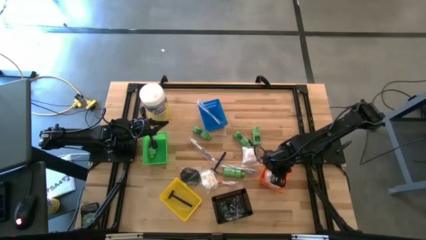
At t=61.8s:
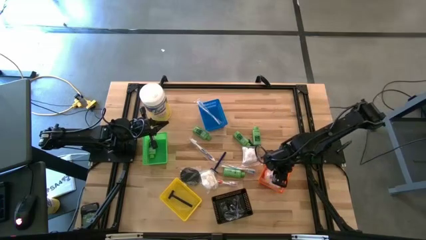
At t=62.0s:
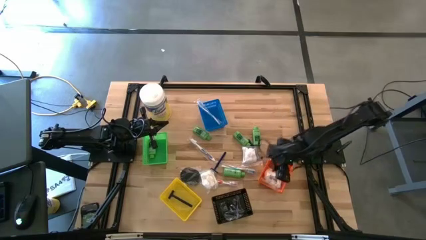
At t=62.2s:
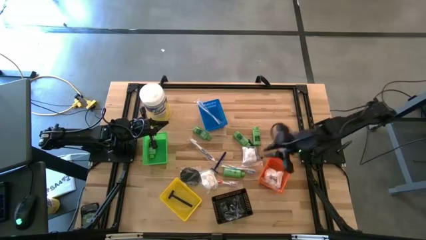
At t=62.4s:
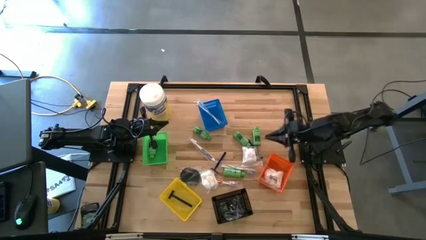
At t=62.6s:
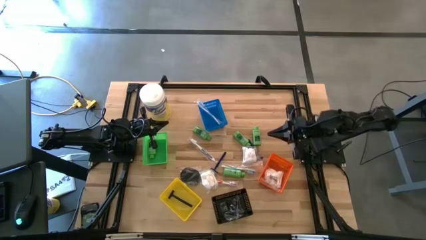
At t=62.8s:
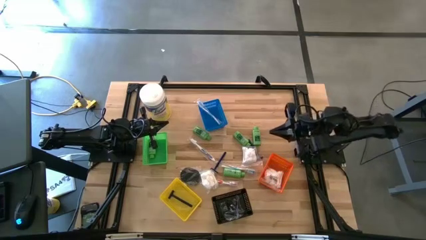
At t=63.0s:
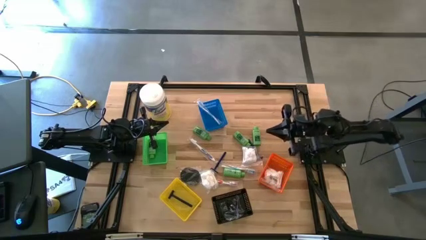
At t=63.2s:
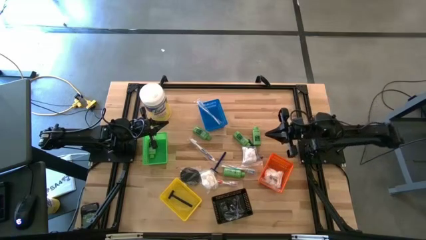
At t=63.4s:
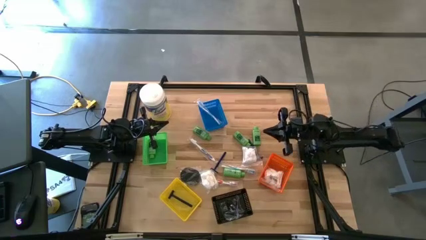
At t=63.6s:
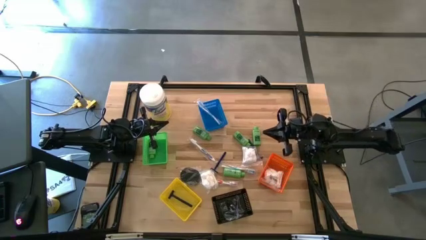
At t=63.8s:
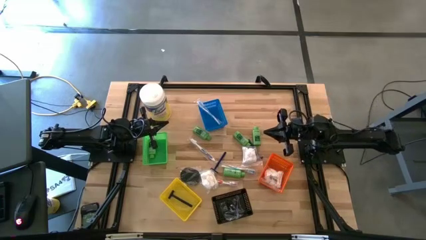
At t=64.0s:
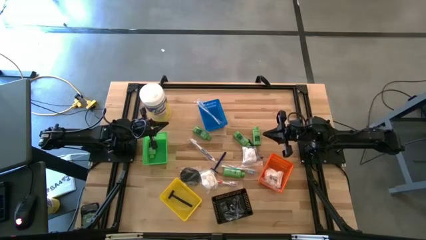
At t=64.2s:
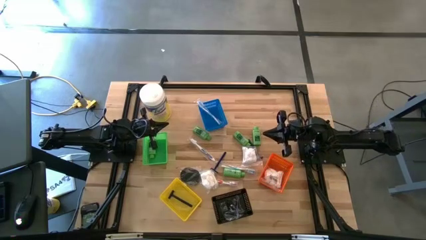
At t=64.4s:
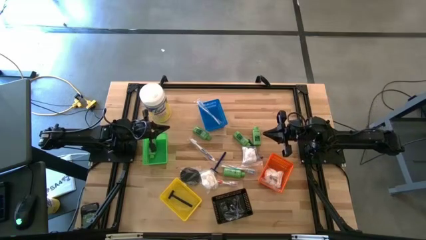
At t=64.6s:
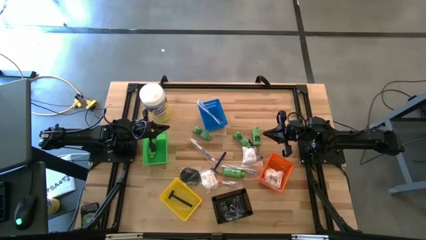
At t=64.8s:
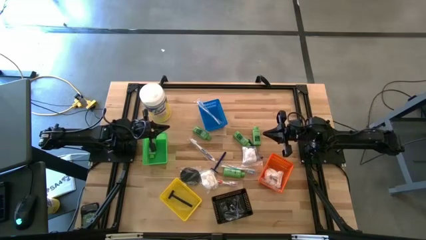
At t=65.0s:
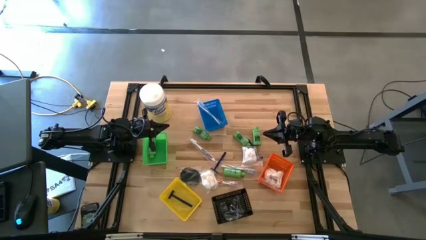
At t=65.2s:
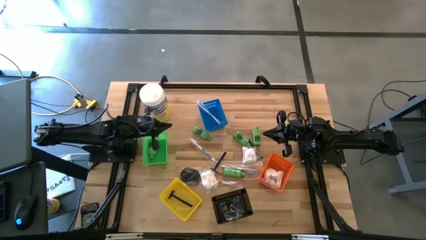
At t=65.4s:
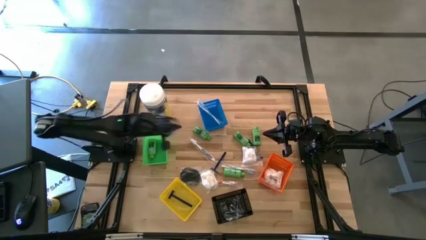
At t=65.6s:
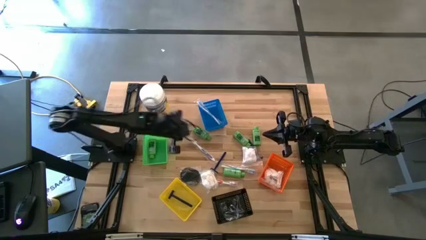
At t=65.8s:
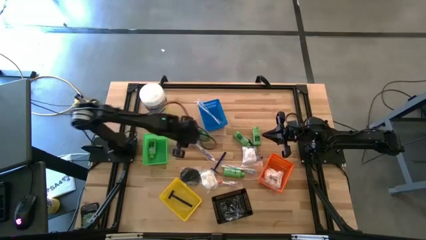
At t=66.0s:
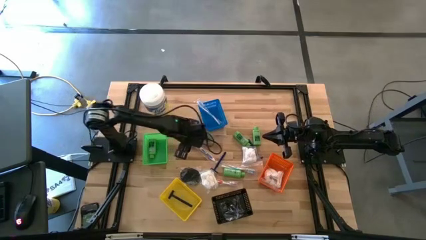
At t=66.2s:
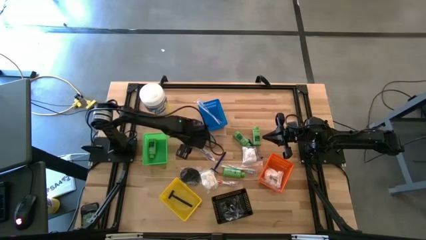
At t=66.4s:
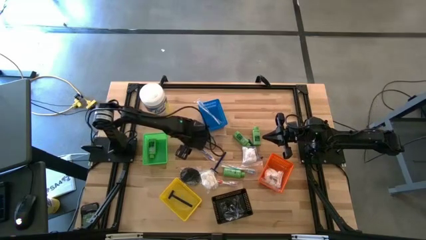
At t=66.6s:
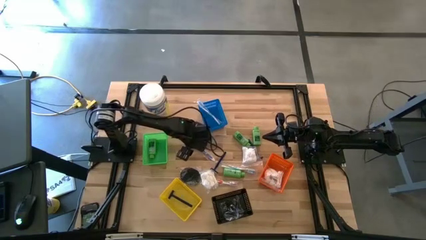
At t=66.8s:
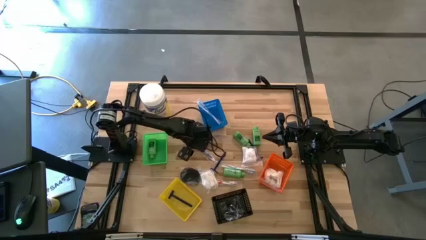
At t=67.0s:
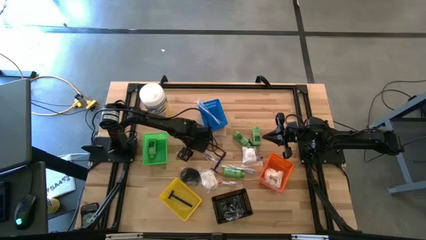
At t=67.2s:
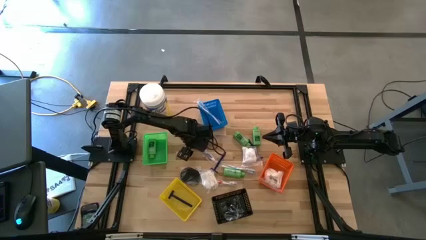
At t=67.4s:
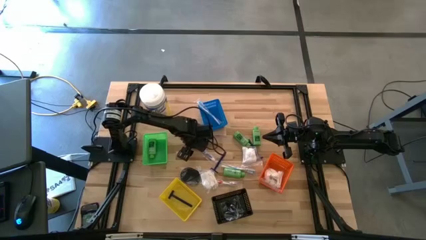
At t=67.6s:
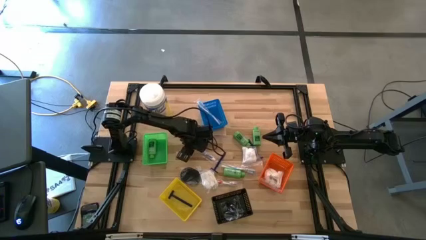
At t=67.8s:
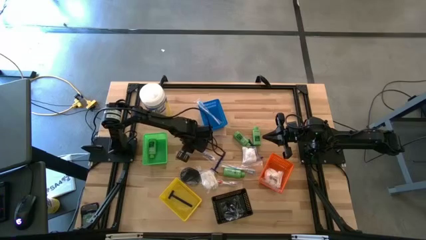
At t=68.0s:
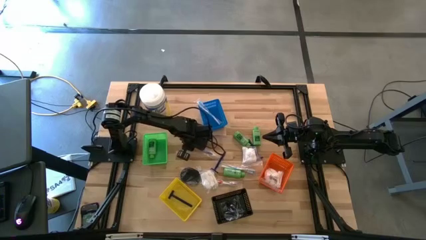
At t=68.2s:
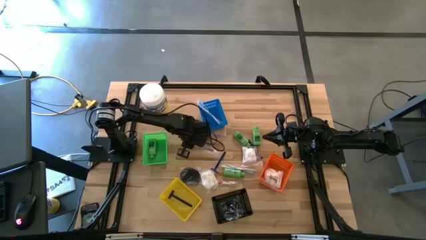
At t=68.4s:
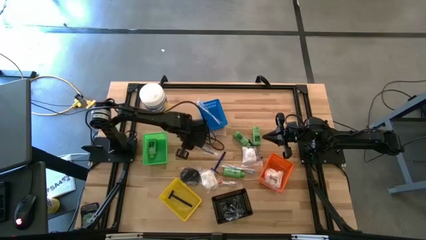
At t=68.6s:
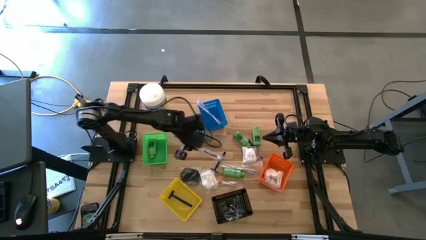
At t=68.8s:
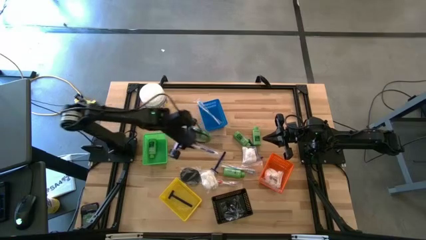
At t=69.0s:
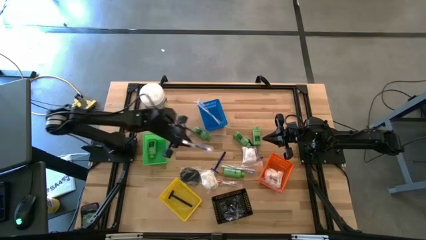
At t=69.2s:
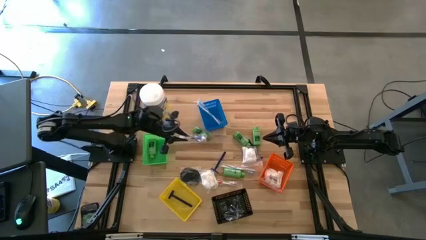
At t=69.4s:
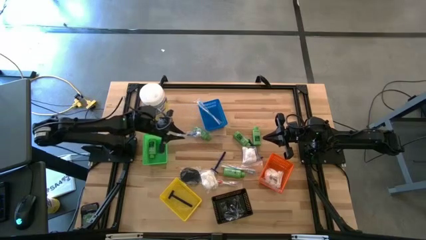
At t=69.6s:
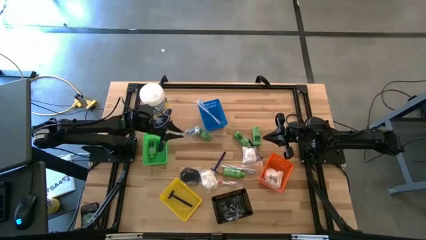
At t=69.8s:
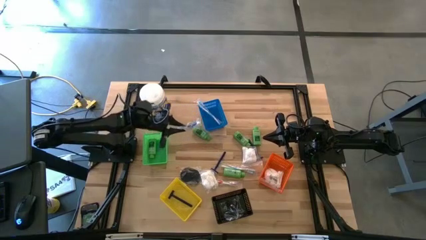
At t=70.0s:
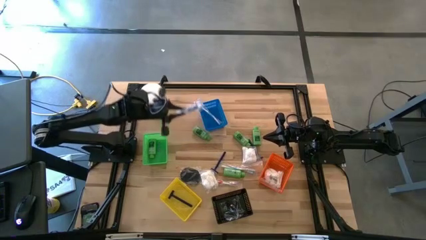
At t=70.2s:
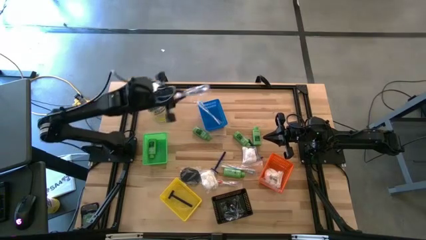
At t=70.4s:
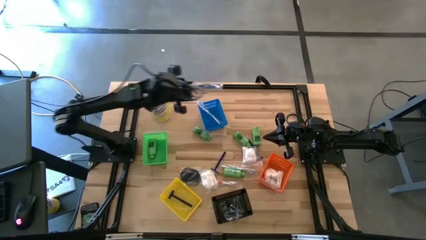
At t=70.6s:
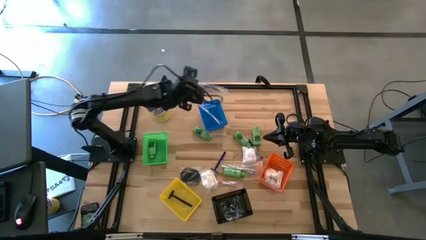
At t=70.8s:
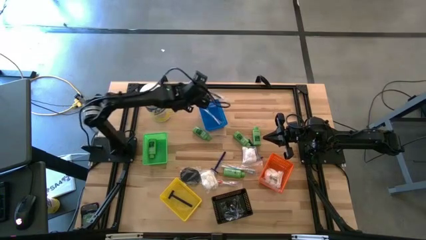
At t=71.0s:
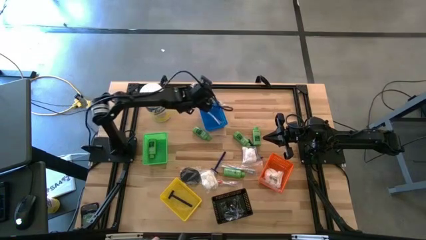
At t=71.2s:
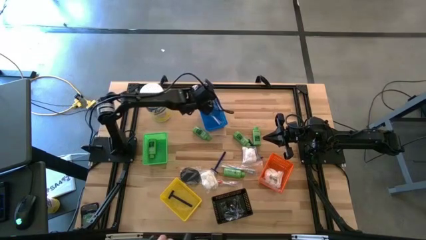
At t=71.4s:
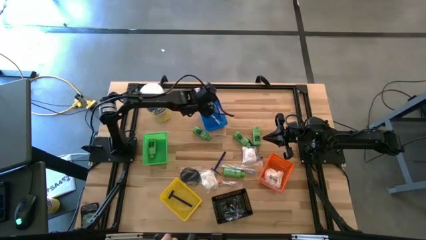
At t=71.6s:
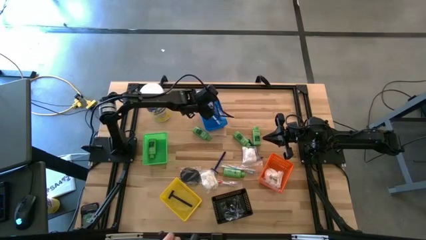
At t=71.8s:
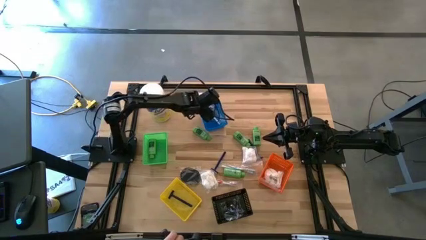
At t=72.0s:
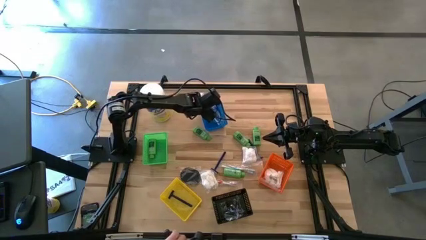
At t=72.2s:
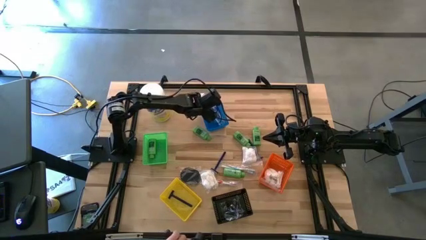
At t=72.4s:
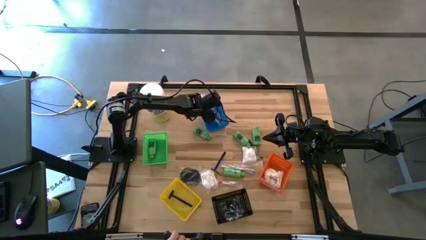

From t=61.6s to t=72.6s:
Task: Pick & Place Travel size toiletries
Put the dark blue toothbrush into the blue bin

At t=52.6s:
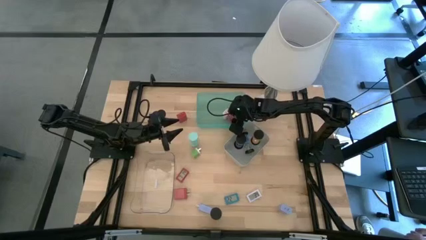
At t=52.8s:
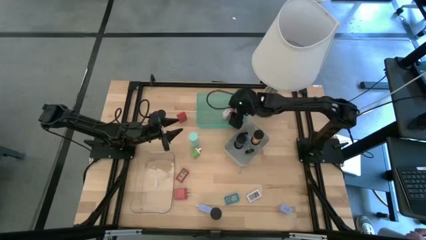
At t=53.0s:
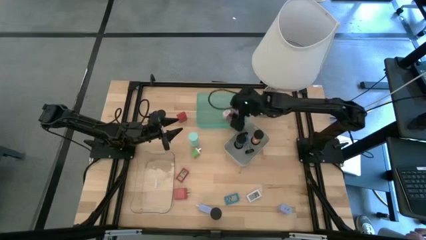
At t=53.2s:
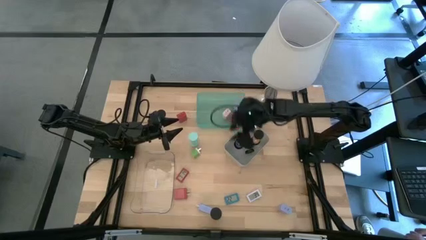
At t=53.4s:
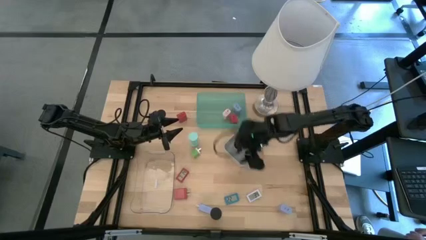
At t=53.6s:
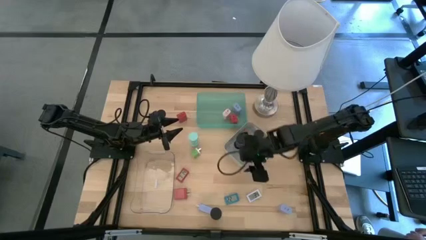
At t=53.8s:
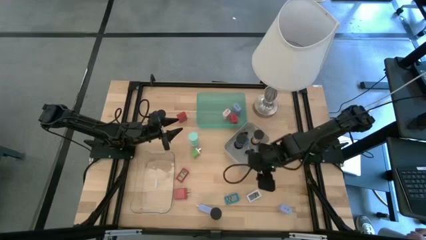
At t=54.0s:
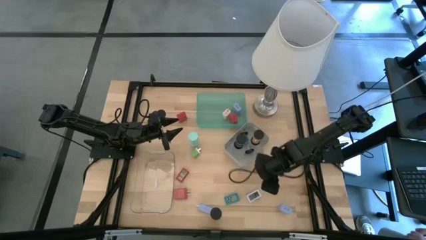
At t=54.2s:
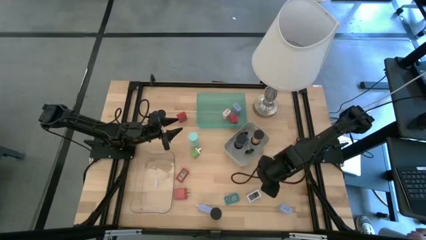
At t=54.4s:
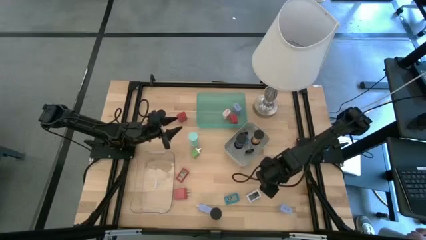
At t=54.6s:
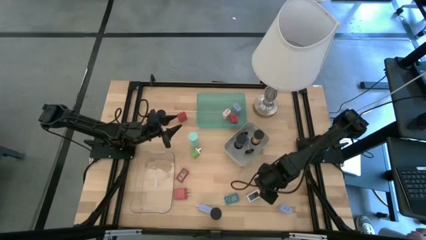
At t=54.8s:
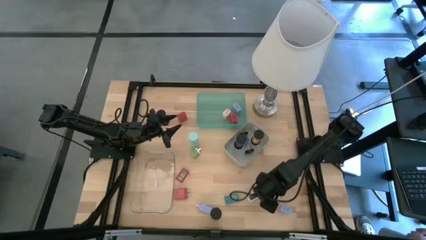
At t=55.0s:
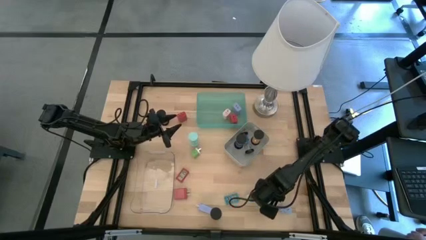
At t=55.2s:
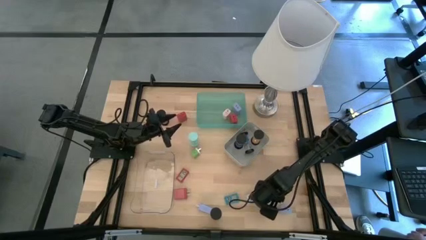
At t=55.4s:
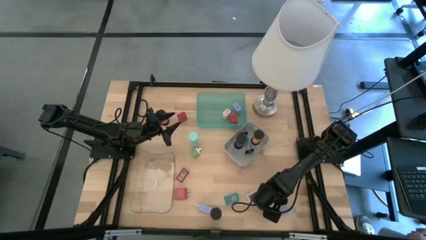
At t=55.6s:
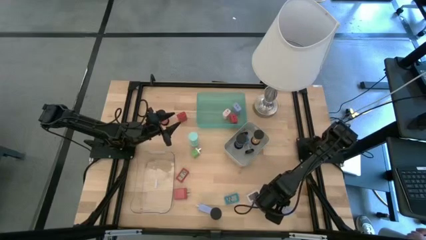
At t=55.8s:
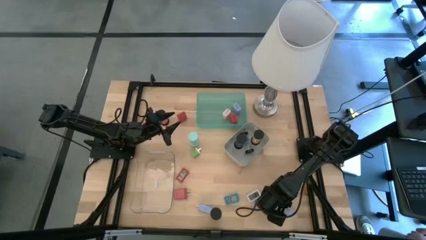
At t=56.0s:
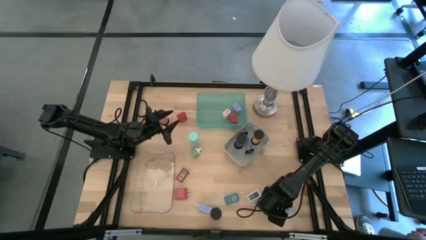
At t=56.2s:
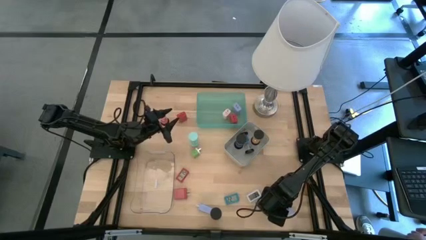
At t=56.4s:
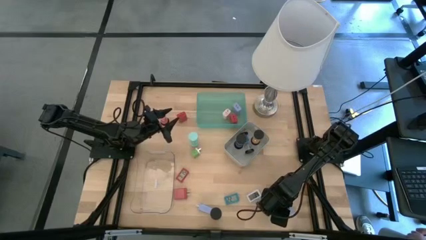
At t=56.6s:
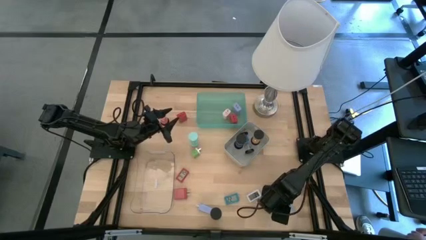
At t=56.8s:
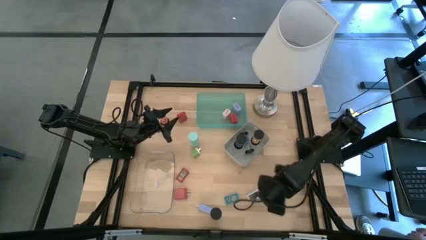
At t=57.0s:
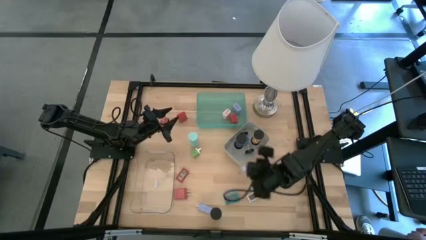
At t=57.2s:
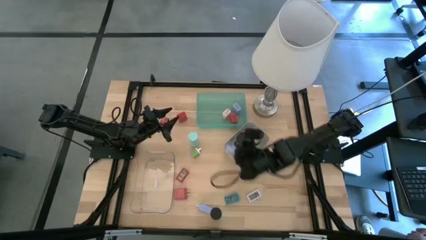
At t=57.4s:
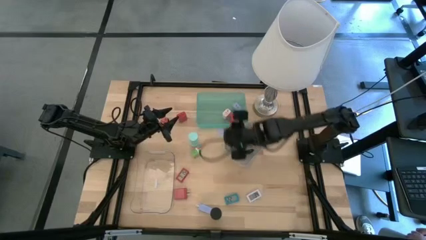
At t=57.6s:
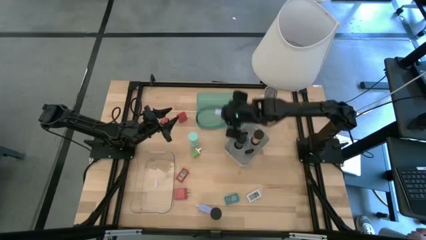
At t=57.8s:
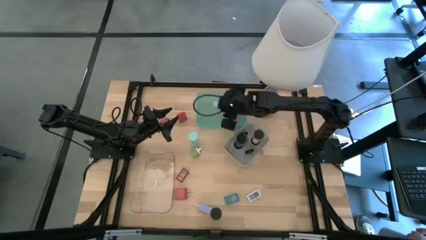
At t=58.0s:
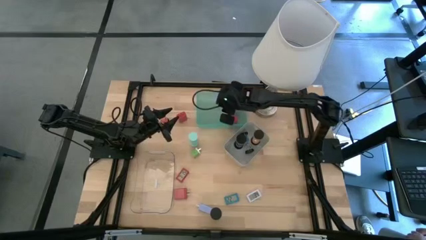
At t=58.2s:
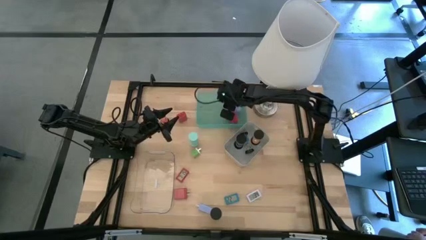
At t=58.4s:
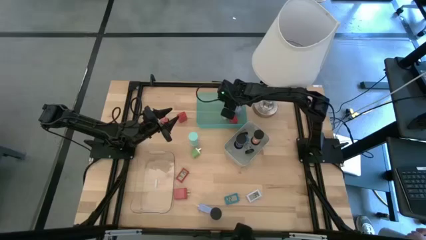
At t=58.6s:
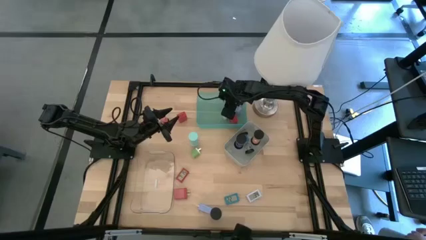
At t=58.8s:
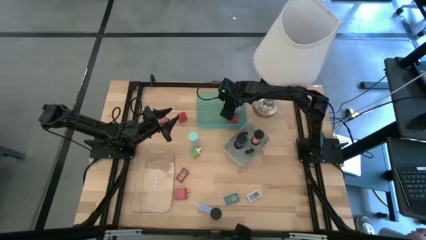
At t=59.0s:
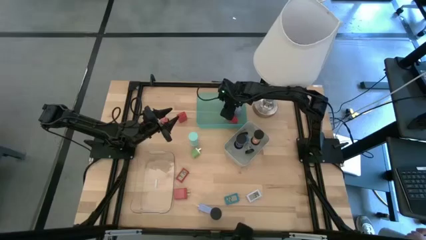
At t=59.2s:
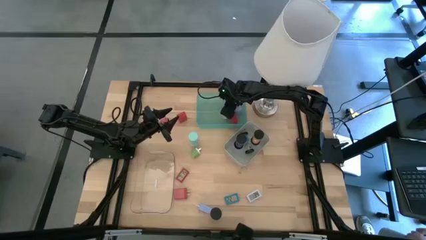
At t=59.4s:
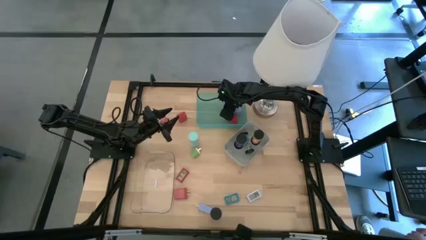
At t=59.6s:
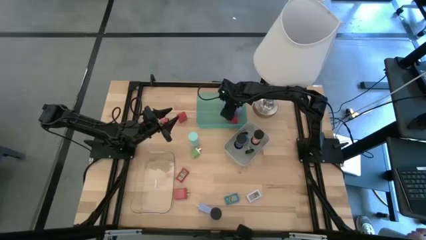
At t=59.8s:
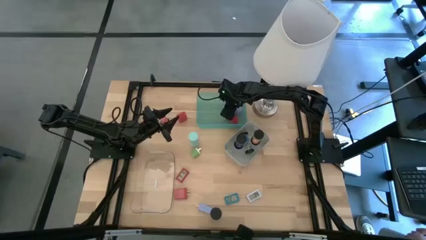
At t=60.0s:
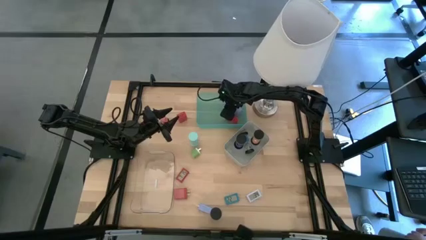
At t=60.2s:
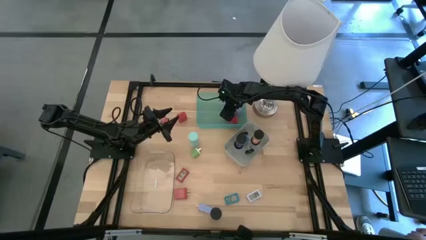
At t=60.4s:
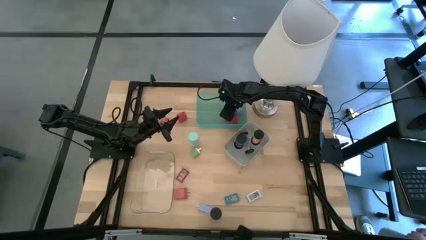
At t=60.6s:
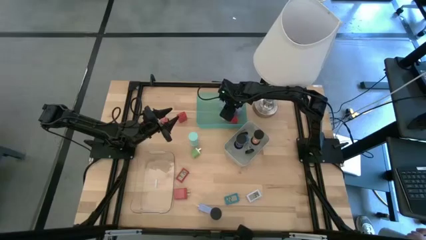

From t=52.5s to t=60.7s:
Task: Pick & Place Office items
Put the right light violet charger adapter into the green bin
